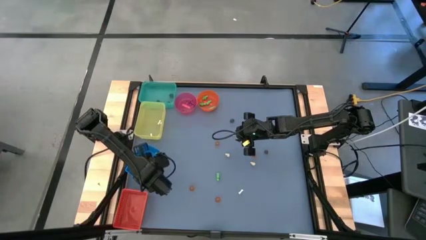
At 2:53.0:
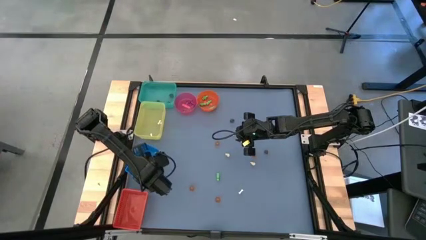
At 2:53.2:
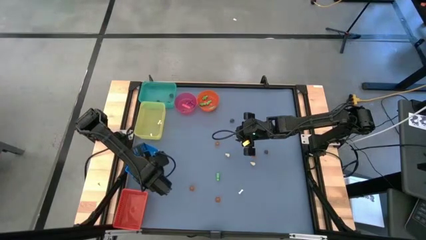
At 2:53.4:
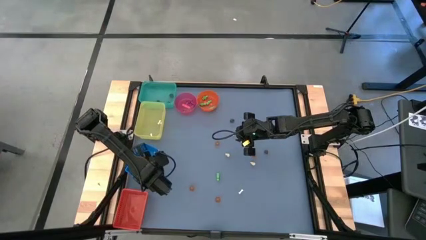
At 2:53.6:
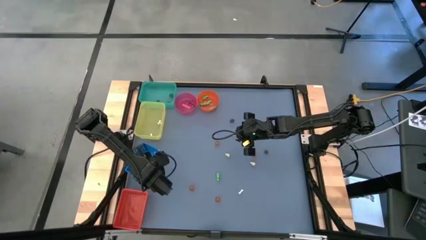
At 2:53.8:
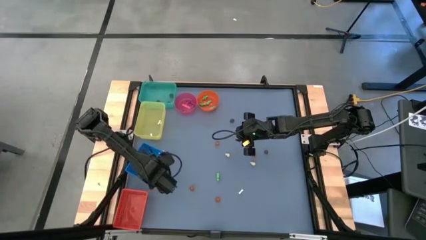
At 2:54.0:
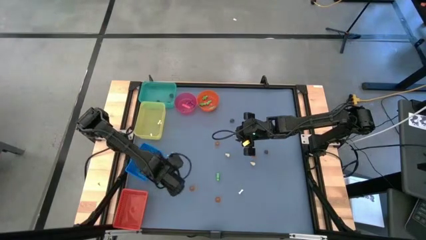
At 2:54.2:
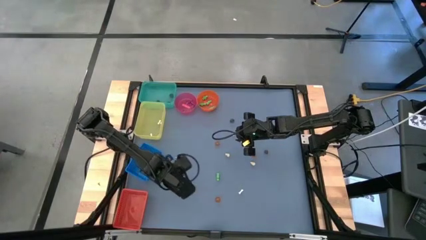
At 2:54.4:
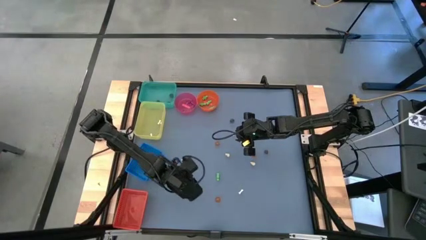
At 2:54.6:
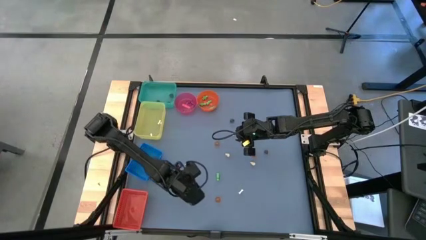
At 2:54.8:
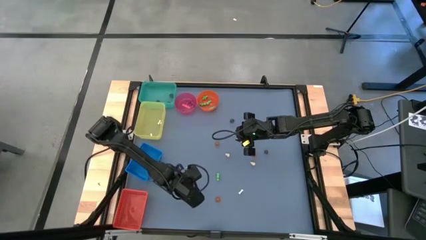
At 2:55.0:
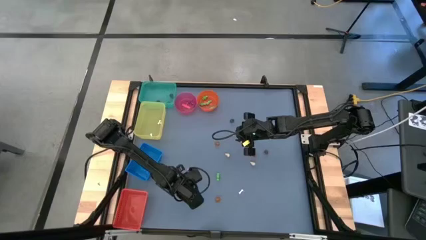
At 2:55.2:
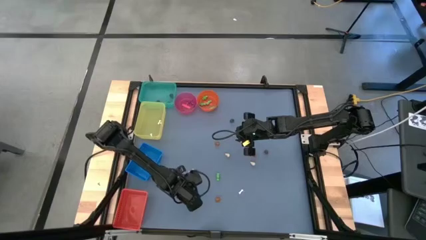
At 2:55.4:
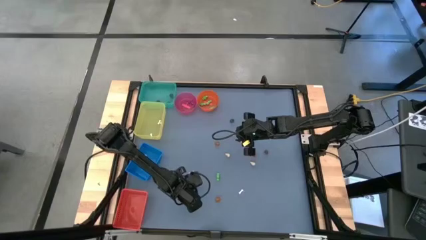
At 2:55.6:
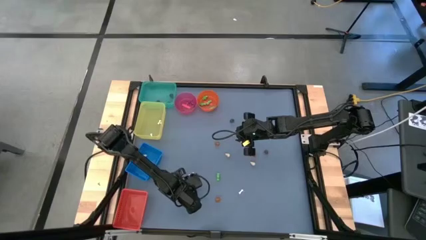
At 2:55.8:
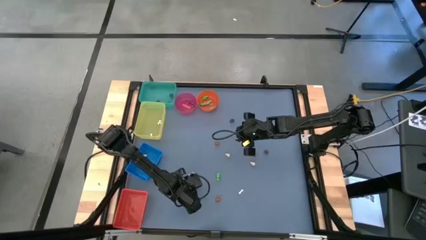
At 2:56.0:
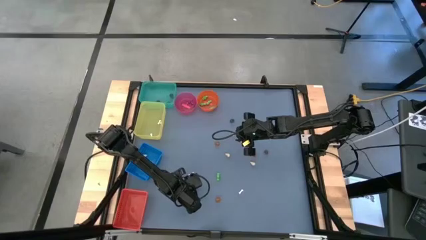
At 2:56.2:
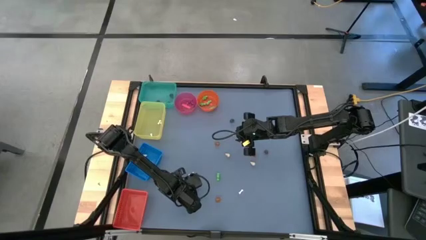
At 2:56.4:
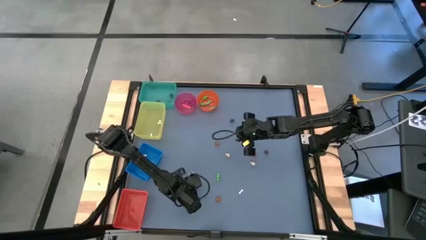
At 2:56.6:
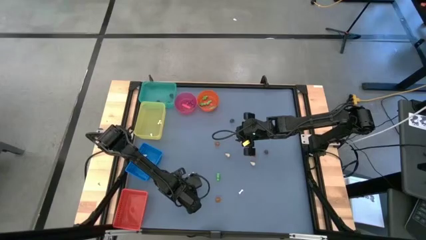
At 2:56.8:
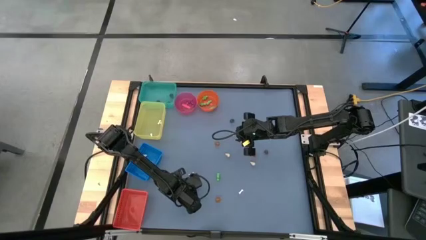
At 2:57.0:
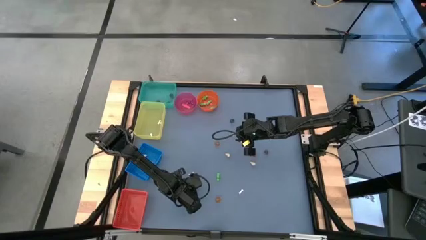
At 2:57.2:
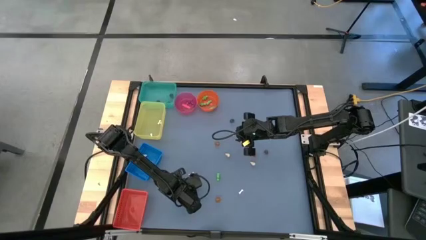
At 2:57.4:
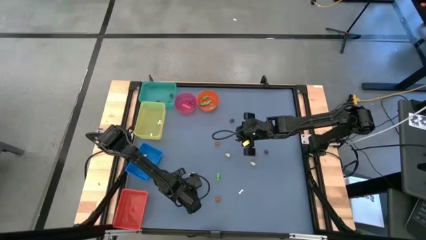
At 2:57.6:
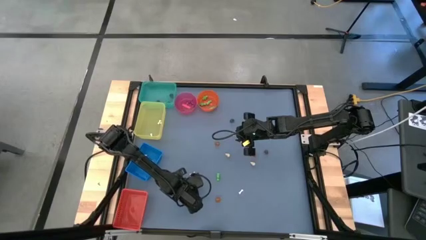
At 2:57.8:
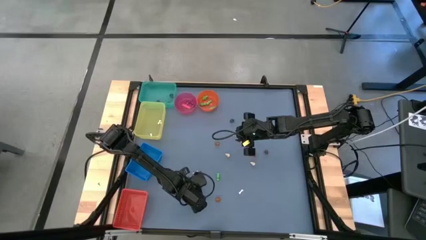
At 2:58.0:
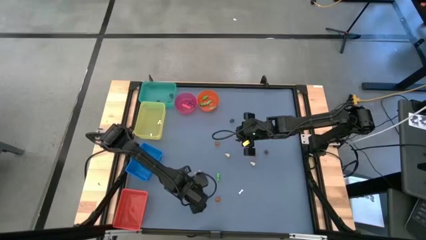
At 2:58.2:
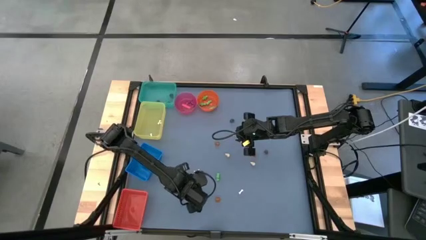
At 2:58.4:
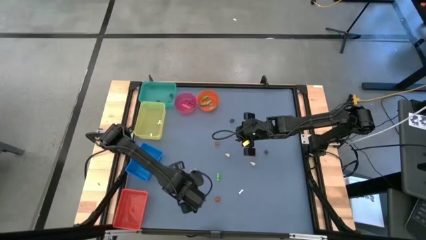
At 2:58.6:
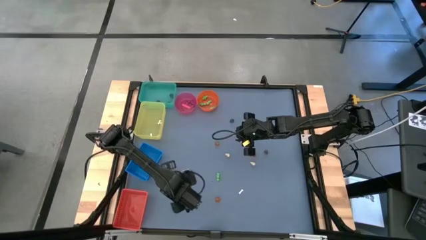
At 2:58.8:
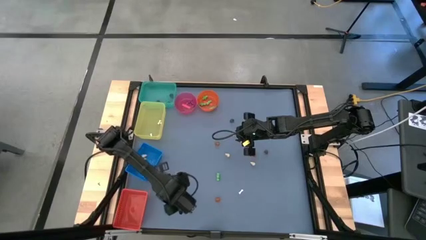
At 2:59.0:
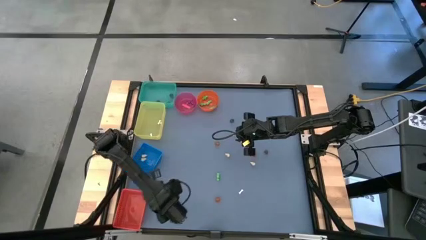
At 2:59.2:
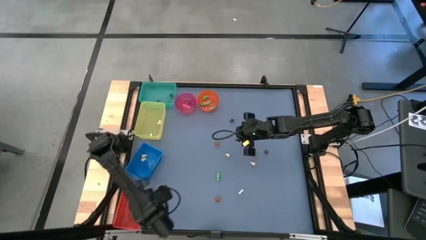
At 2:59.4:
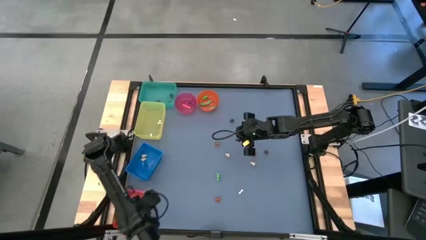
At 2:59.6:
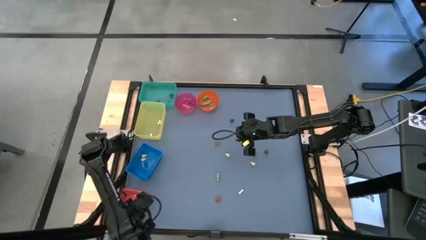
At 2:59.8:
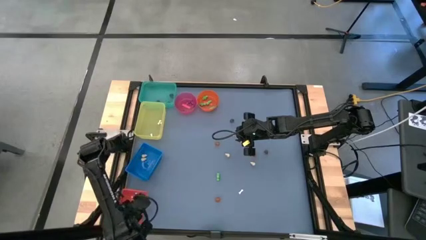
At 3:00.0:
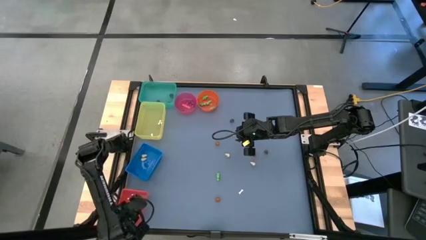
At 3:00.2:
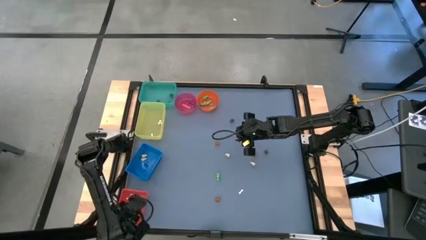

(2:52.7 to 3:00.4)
Task: Sort Halloween decoration
Put the orange pumpkin toy into the red bin

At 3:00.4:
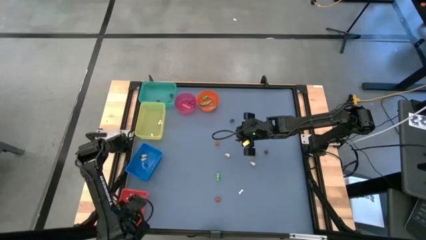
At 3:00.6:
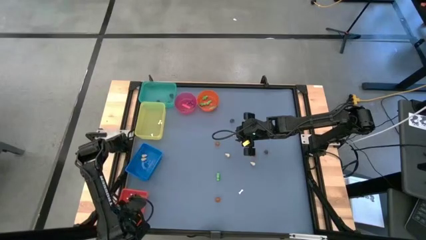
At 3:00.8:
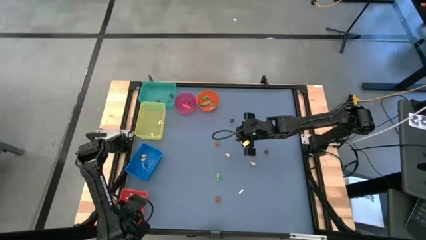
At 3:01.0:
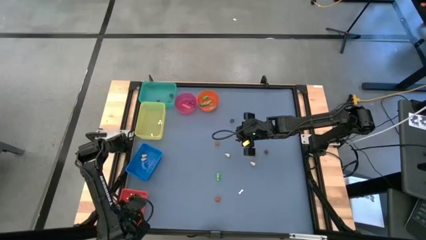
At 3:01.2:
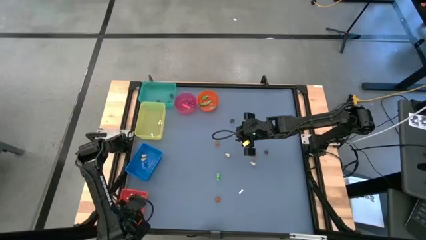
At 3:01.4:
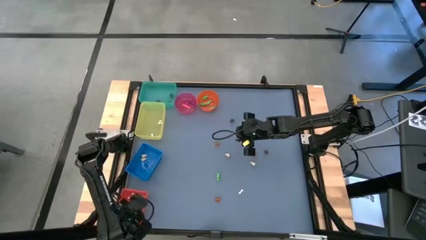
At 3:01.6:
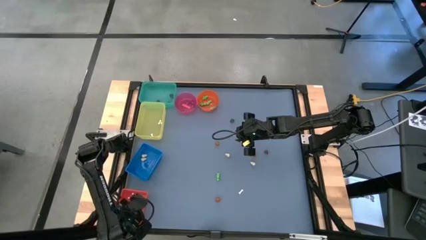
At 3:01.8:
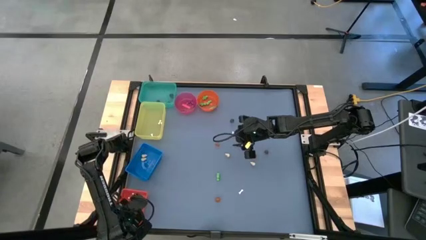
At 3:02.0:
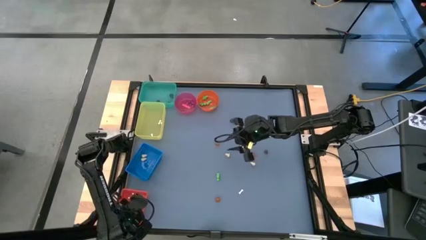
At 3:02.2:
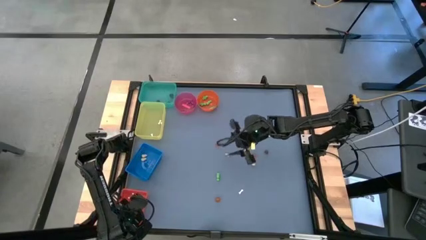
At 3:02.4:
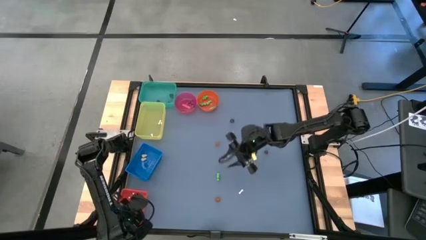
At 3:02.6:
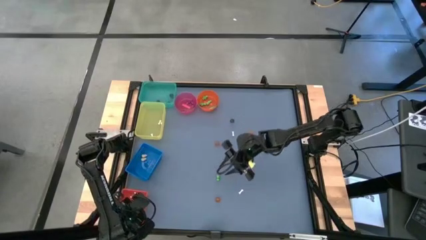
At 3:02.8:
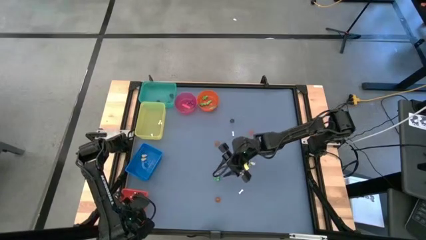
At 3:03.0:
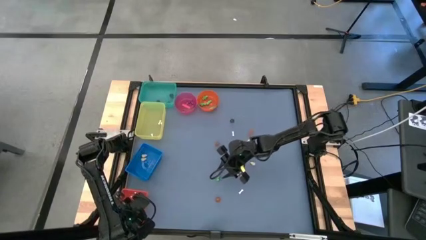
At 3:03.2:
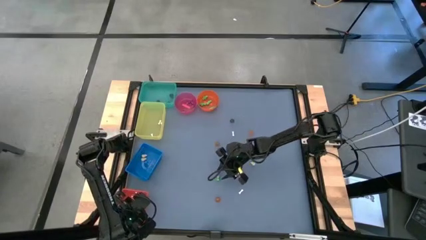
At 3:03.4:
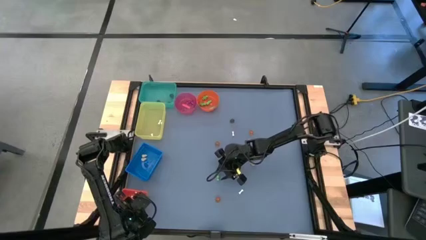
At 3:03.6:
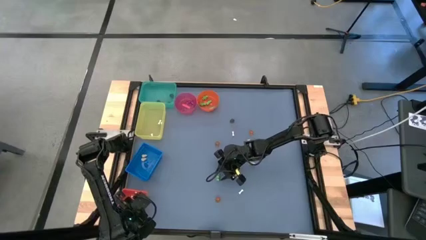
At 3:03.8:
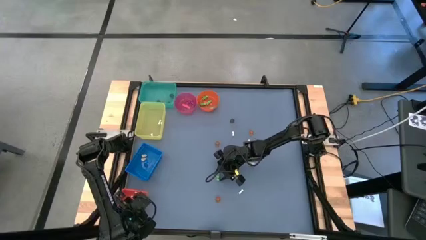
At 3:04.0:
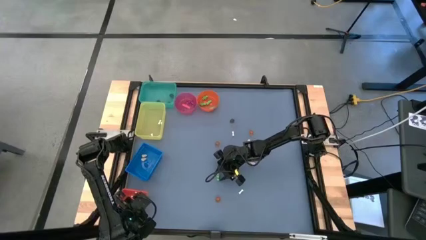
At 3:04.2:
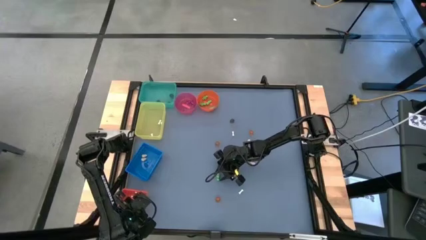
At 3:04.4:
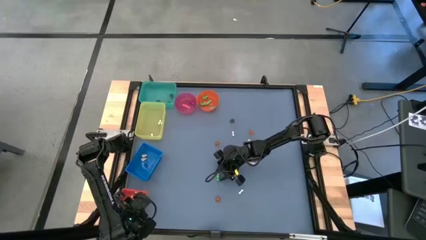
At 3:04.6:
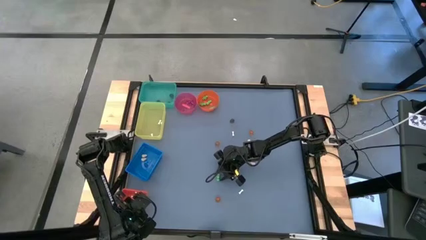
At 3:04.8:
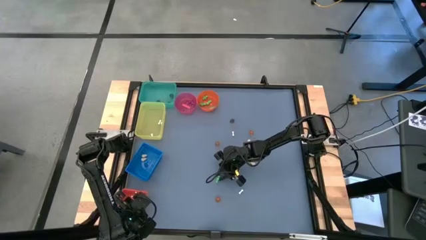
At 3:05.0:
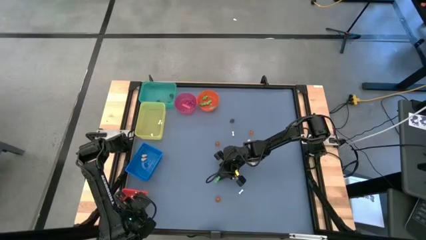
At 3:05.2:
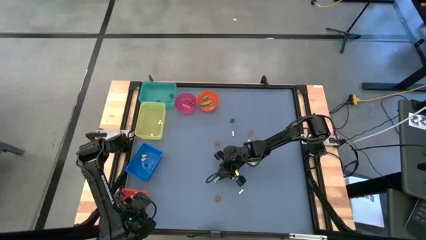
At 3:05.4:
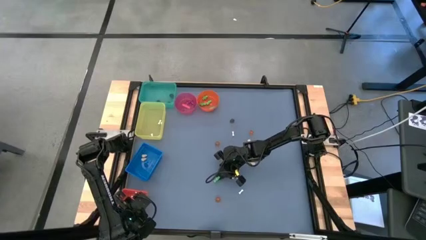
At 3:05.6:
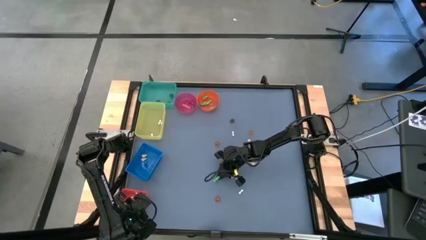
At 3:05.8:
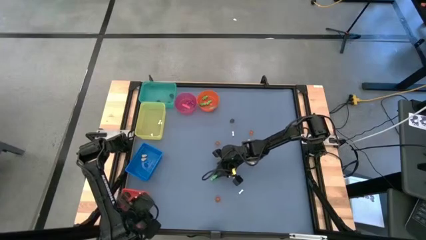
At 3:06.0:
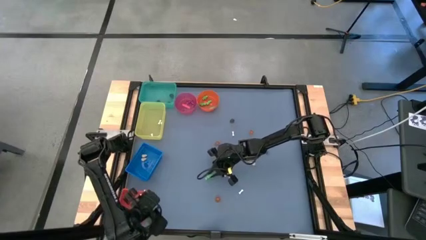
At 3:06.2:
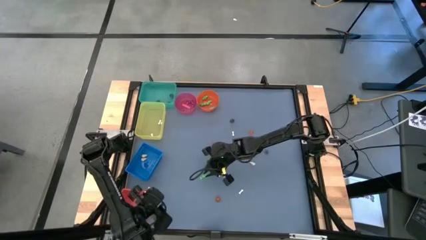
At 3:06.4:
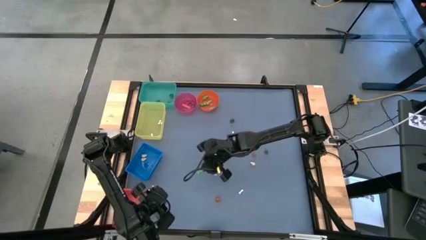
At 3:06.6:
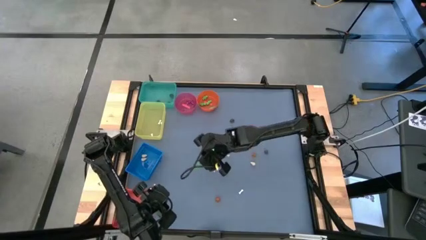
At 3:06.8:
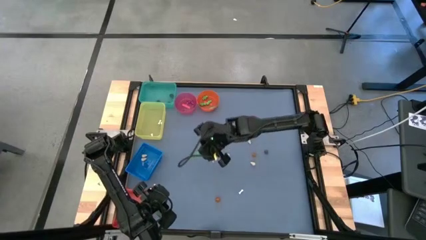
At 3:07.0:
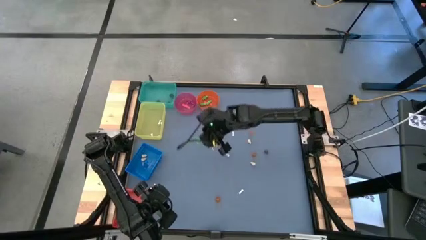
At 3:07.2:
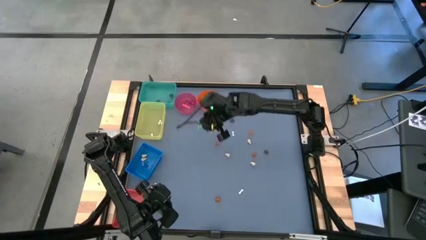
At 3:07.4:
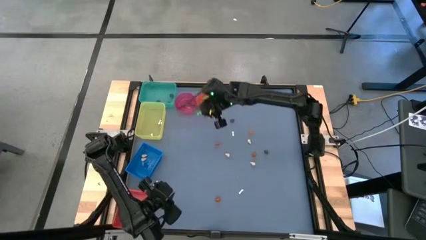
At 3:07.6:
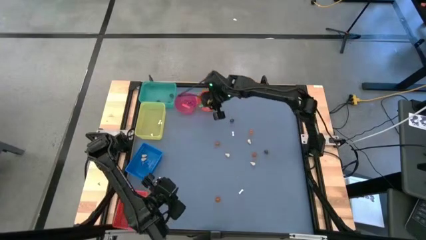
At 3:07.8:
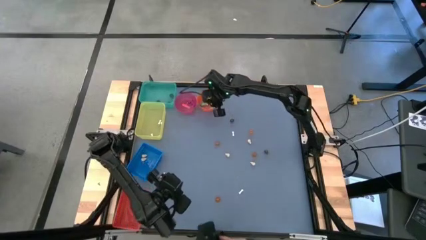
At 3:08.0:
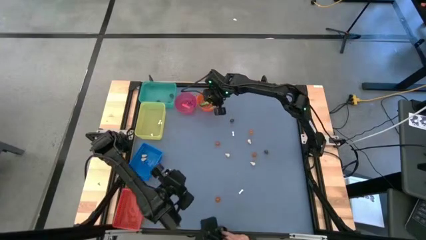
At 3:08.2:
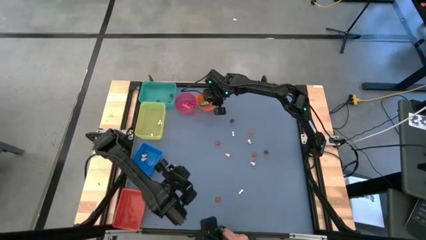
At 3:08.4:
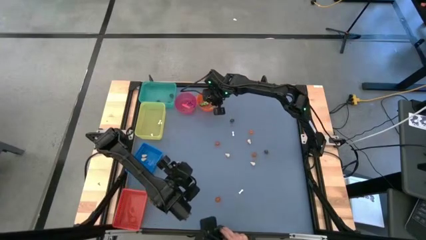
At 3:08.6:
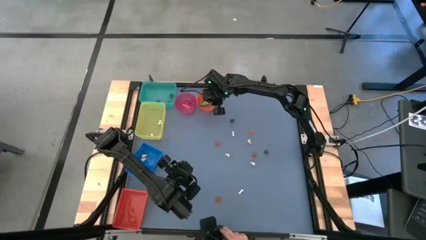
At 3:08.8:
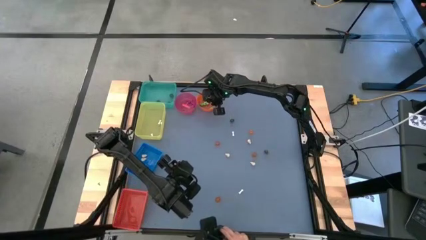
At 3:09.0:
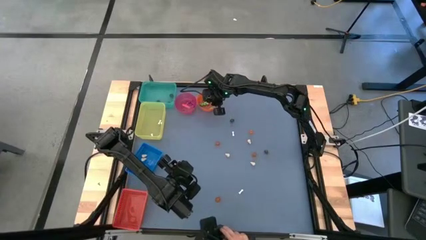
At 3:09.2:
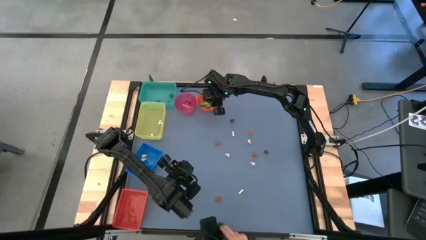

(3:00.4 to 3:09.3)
Put the green skeleton toy into the orange bin
